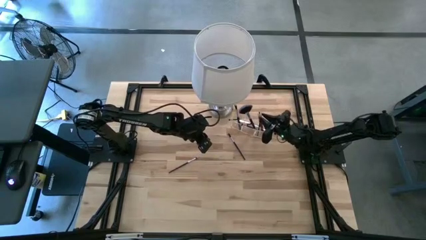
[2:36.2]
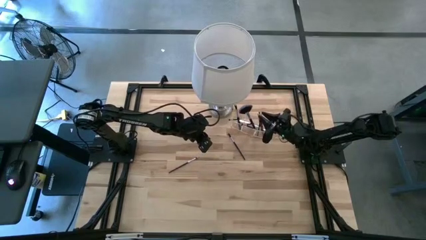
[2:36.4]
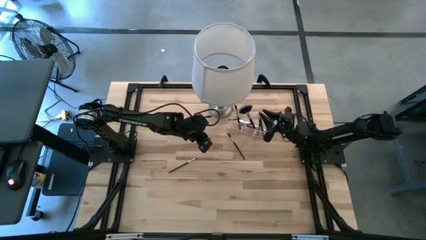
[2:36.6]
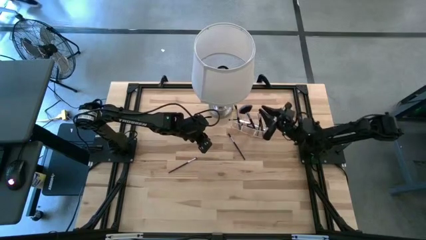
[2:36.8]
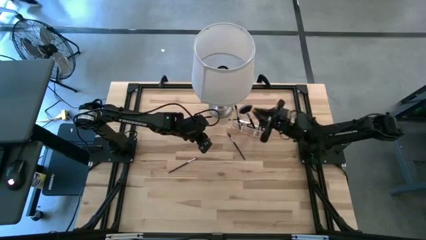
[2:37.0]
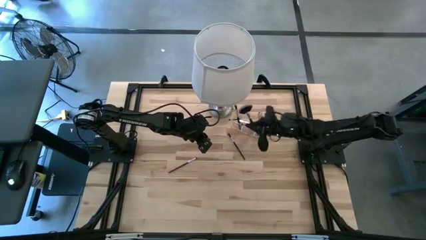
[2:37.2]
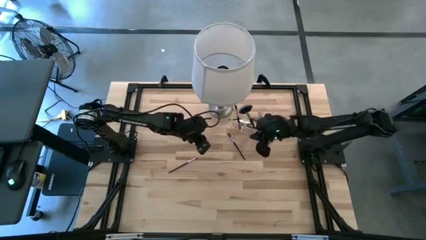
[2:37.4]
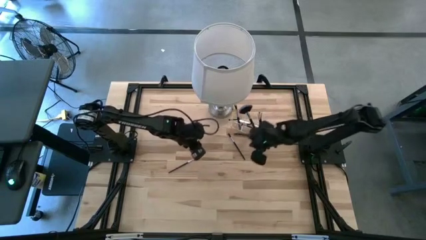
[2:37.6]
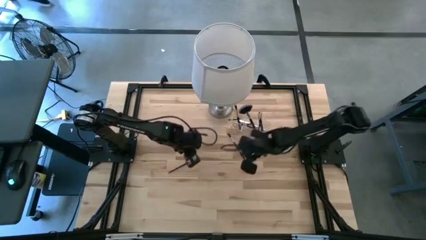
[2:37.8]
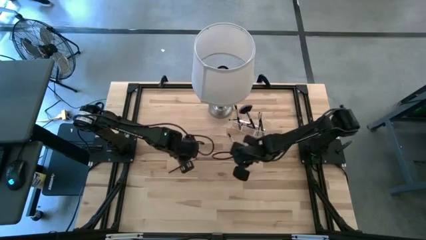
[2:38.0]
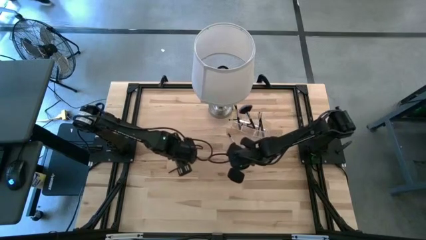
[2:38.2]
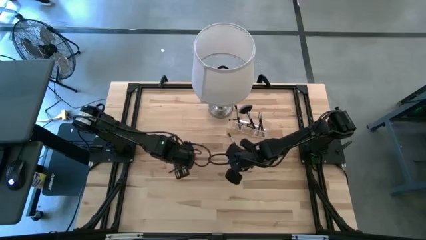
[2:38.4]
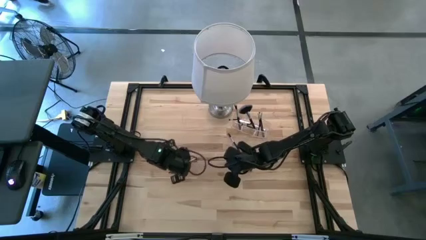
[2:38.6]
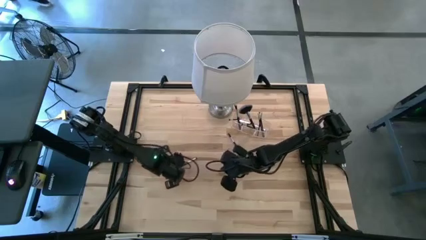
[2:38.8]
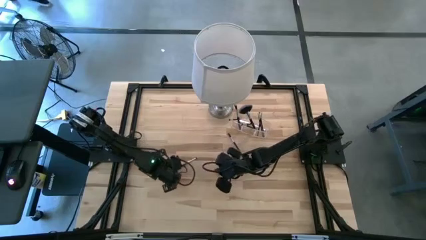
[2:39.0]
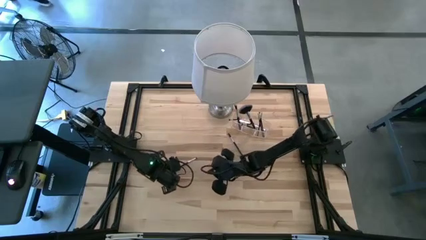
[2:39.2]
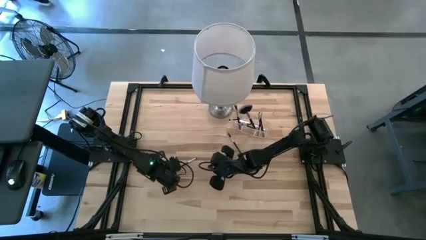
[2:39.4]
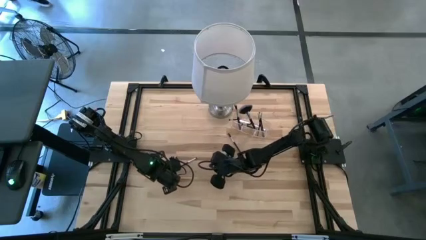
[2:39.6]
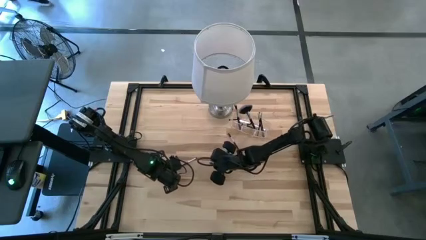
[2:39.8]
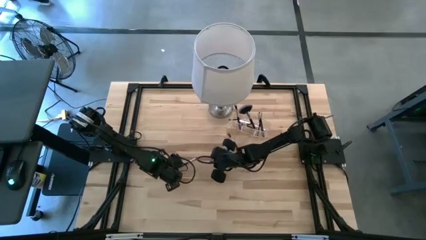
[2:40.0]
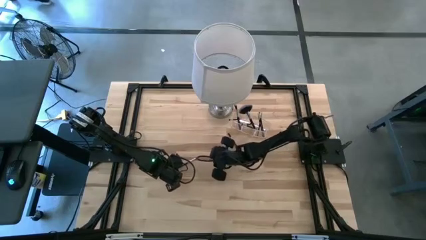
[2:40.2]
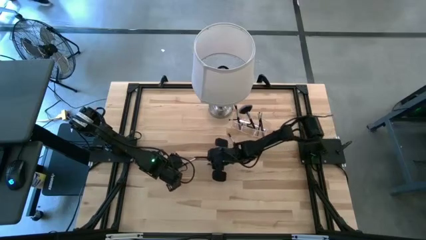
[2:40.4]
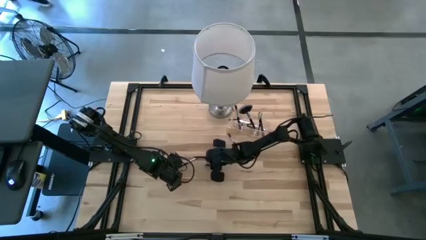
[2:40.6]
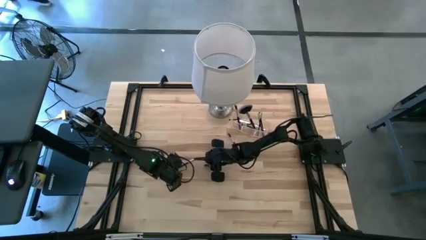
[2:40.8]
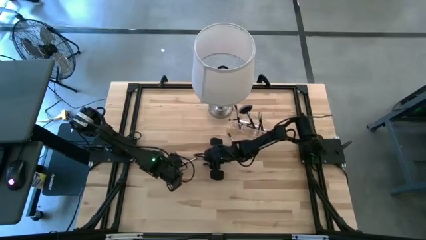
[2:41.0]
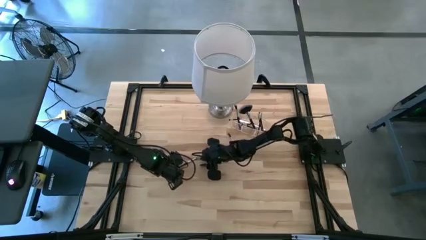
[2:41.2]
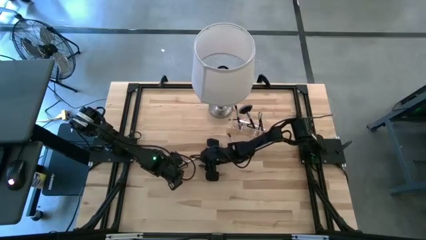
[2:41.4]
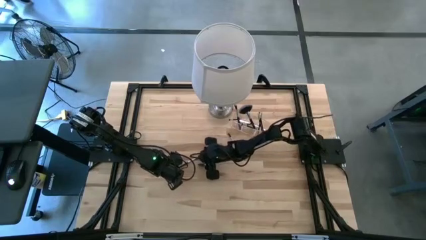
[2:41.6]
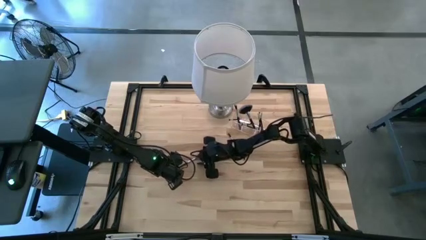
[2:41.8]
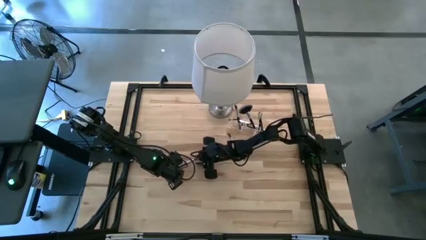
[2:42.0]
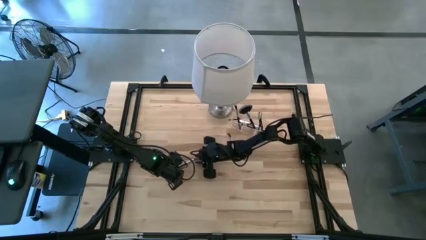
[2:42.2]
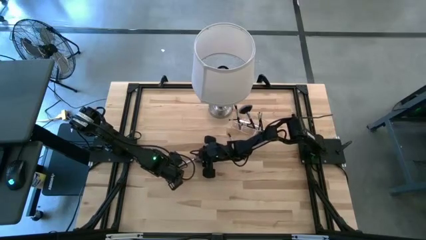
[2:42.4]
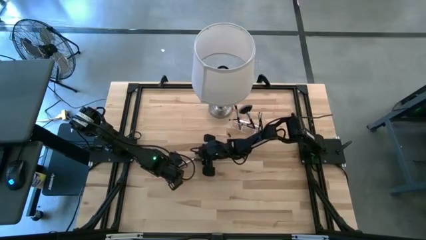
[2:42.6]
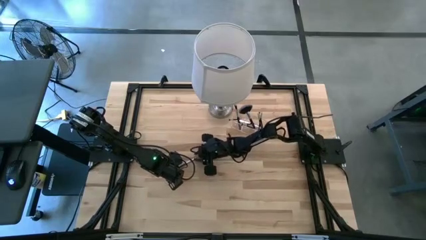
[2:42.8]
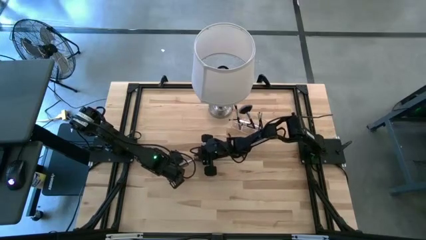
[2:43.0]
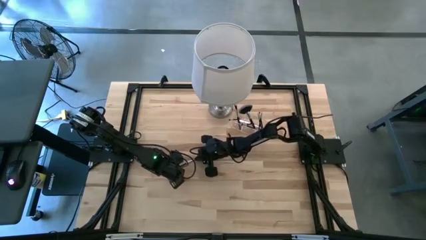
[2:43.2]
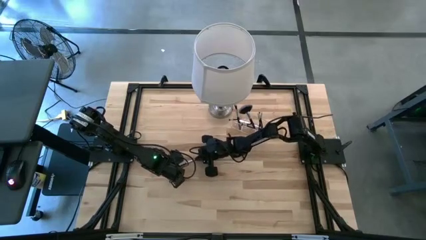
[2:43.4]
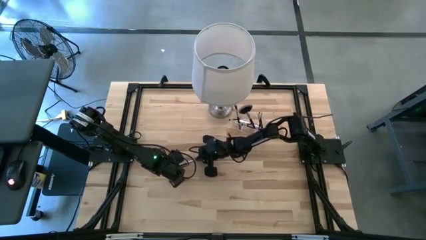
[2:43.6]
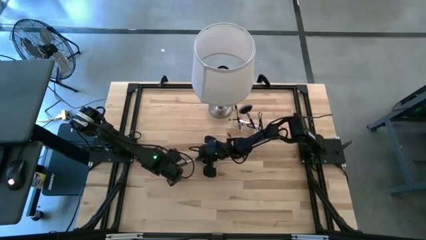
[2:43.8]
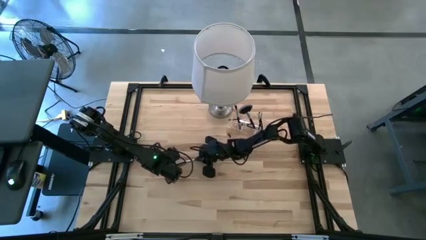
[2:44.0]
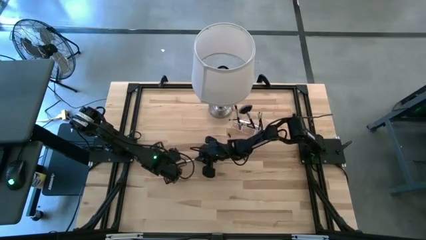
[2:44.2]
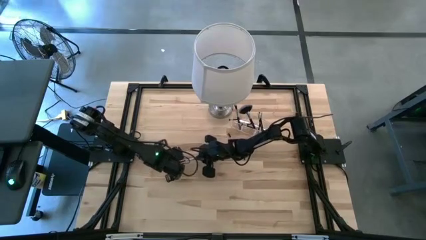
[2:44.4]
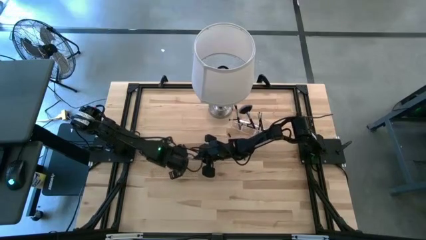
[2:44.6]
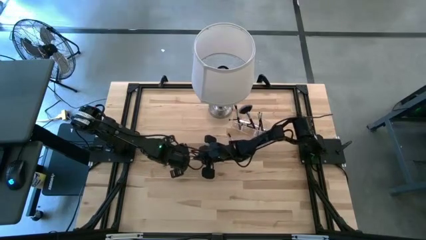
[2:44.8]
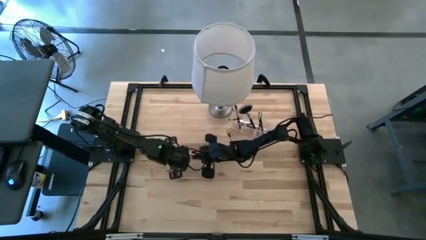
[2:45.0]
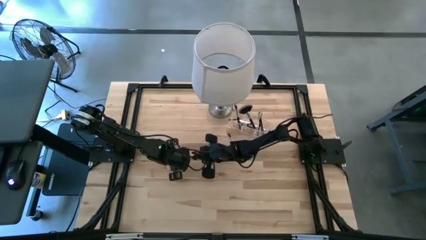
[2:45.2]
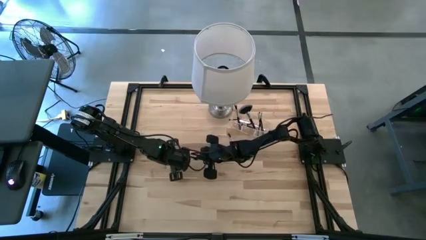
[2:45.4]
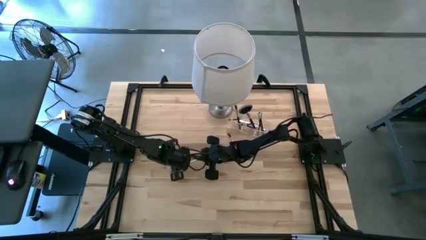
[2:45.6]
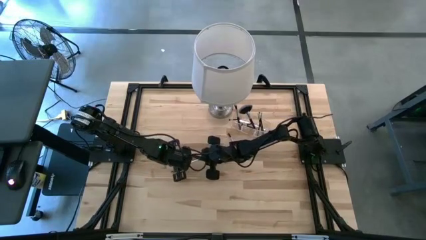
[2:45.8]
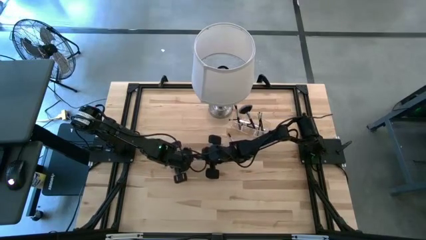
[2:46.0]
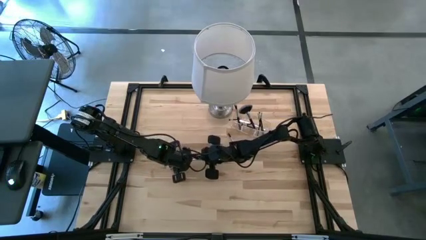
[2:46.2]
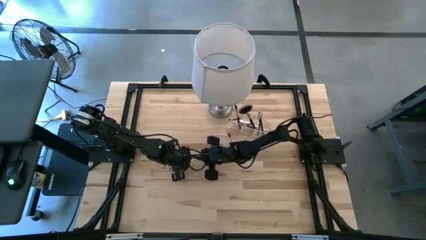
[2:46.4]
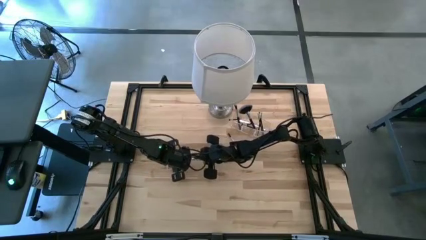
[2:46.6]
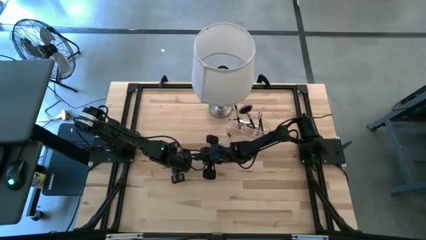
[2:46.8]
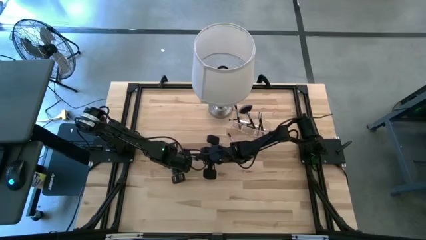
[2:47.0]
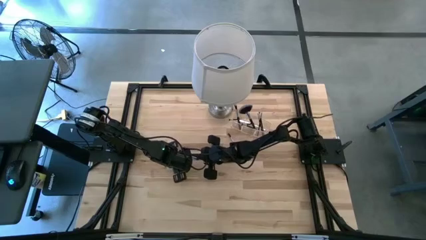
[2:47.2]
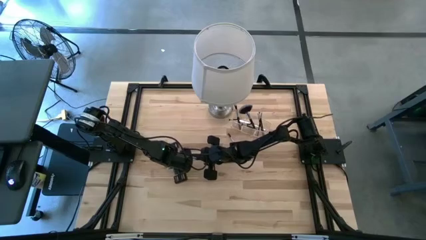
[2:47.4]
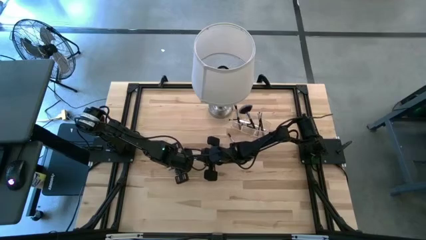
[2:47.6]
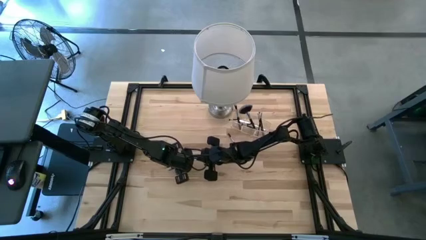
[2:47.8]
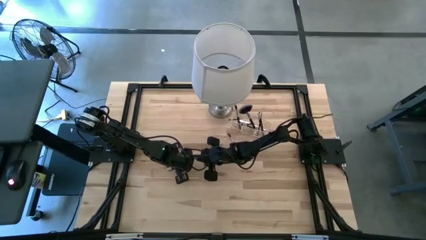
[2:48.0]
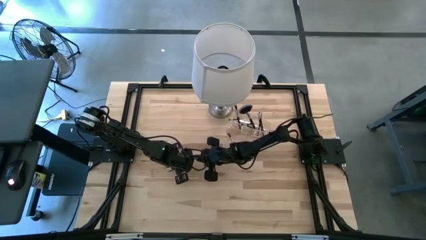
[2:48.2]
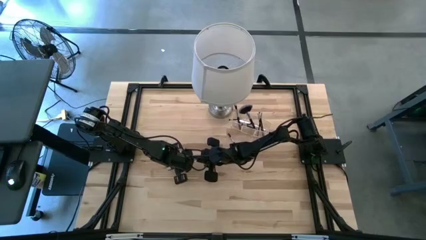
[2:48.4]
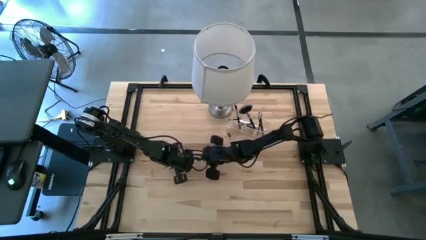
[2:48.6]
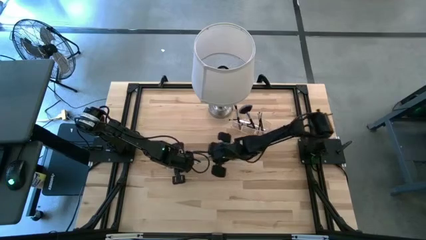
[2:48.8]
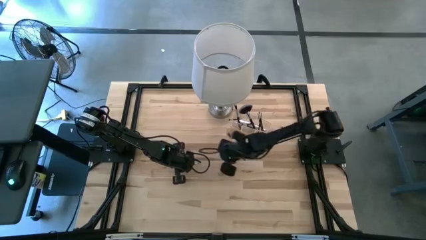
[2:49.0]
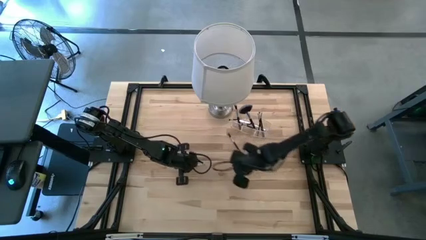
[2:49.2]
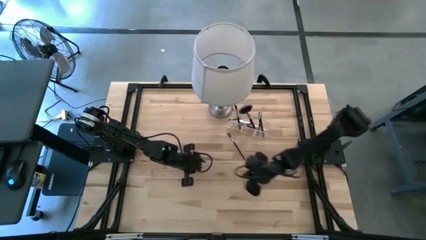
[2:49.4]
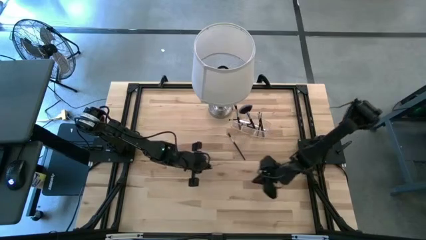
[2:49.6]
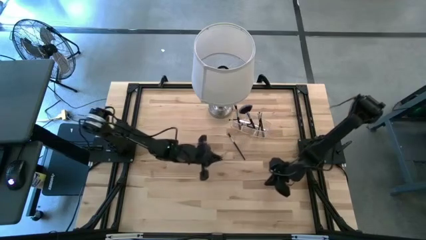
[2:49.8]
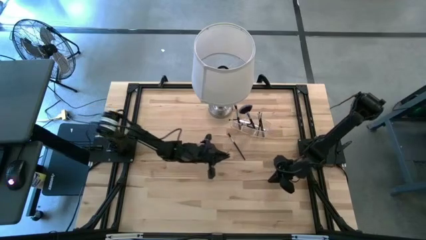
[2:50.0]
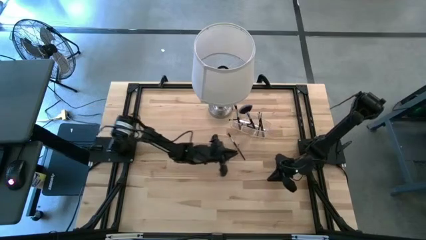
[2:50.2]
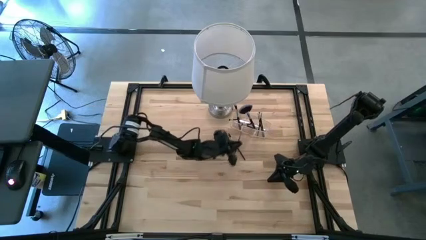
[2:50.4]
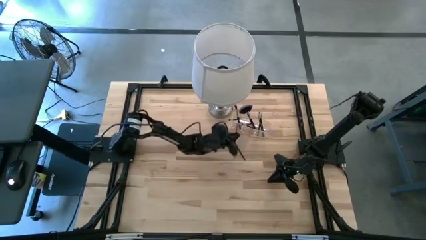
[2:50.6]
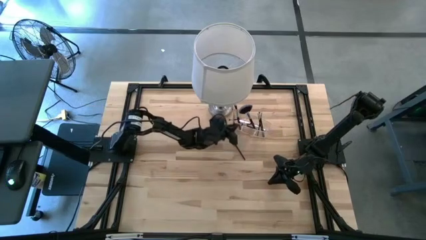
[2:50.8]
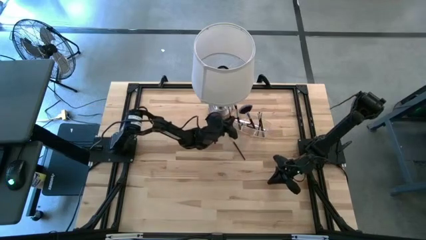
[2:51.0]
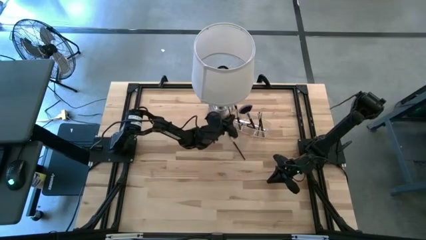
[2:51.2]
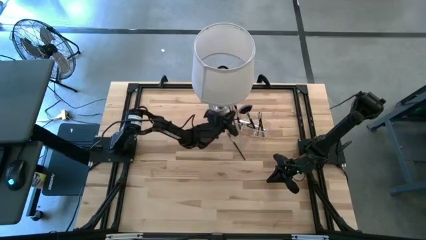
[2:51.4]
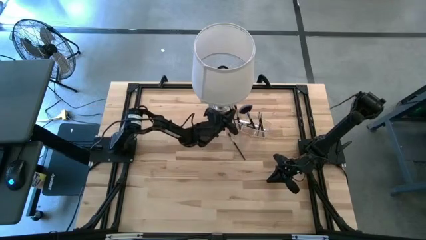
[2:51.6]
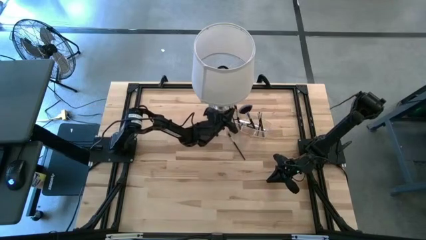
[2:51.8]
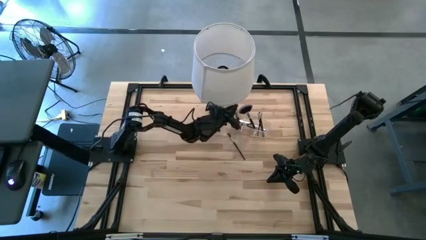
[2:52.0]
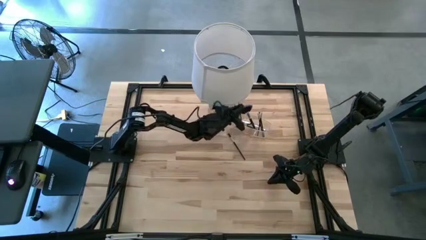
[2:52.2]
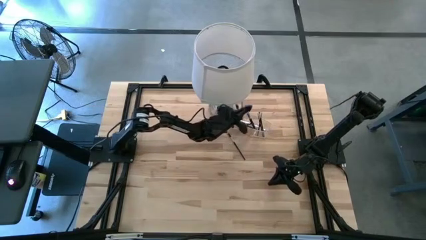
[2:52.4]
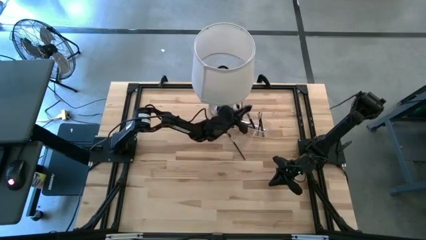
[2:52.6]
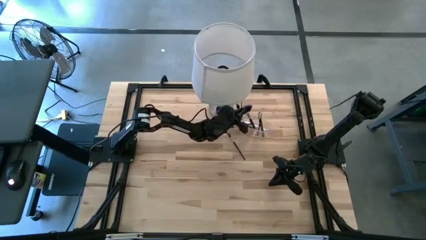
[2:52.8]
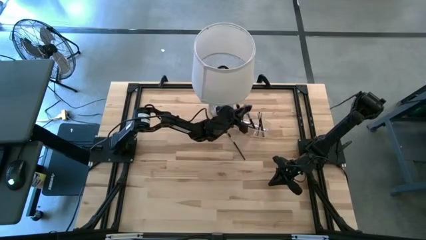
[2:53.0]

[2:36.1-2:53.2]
Task: Put items in baskets/containers
Put the eyeshadow brush into the transparent organizer

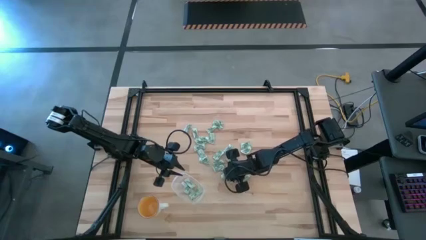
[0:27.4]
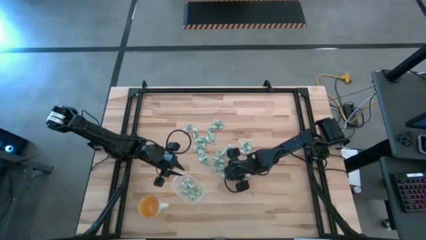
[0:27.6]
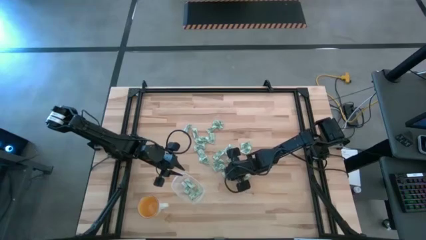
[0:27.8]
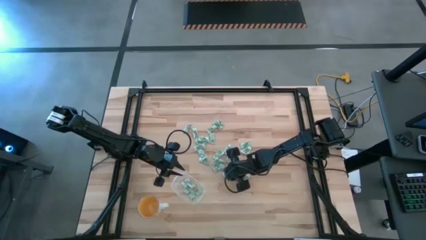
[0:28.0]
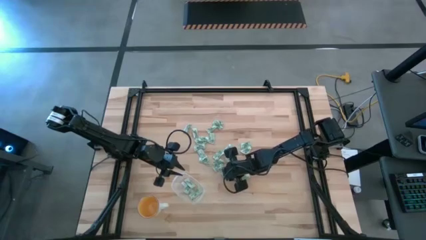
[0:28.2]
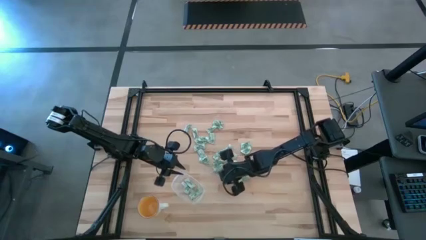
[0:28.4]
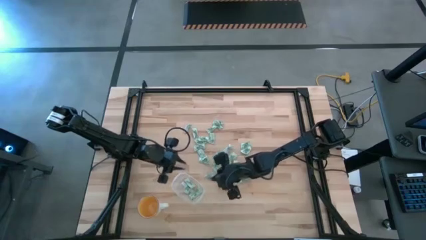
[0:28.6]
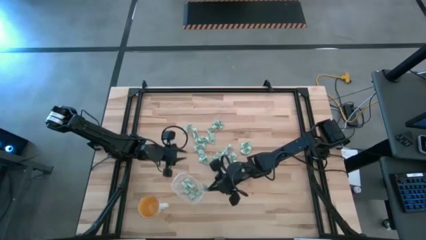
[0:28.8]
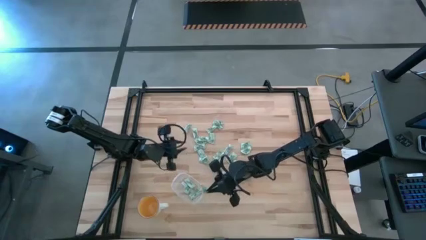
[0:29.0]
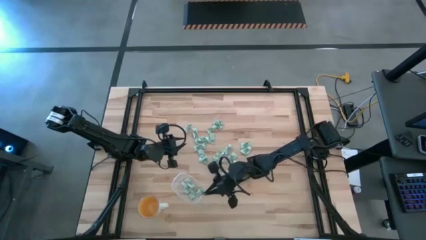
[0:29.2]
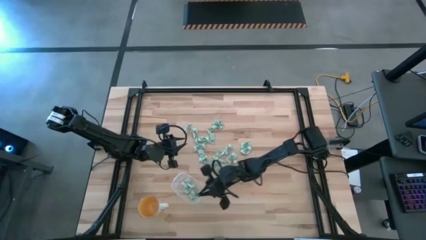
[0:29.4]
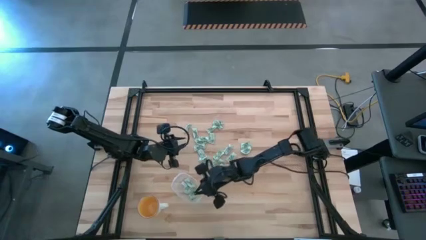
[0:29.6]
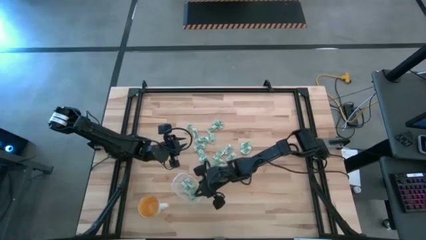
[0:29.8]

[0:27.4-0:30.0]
Task: Pick and place Stevia / Truvia into bins
Put the stevia packet into the transparent container
